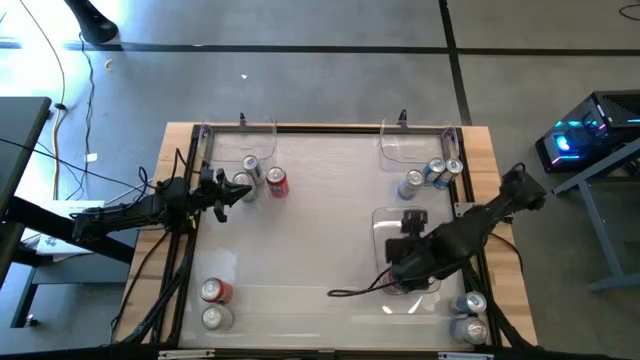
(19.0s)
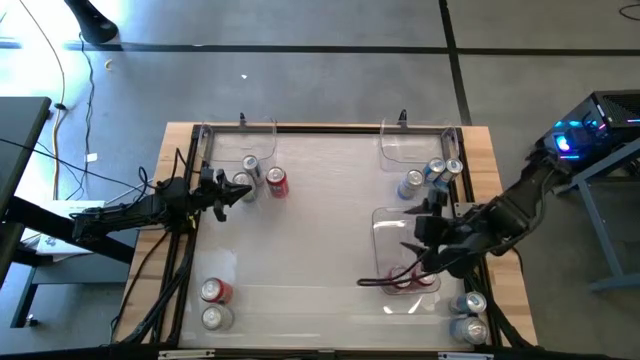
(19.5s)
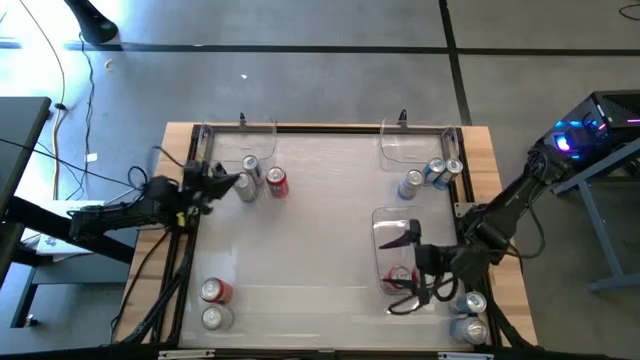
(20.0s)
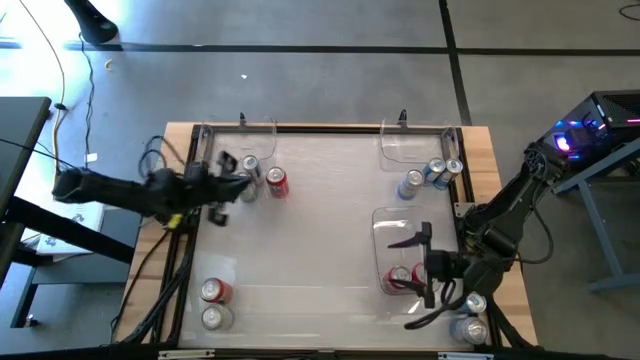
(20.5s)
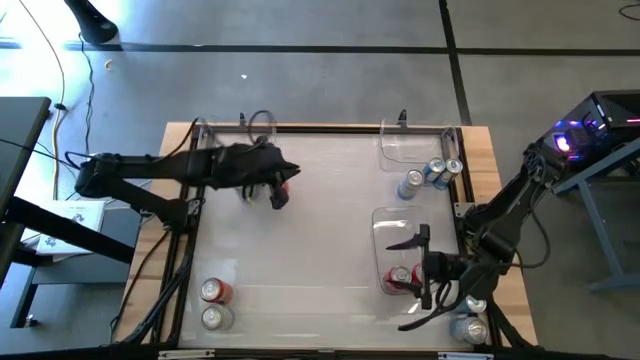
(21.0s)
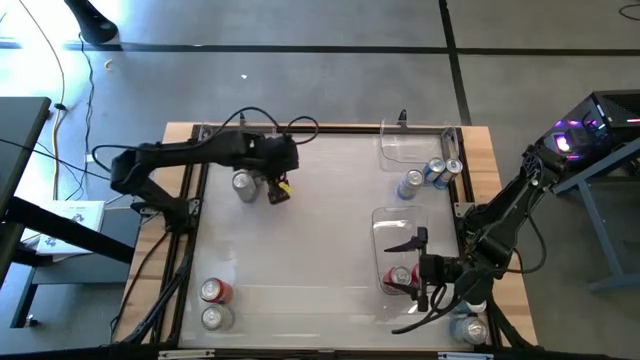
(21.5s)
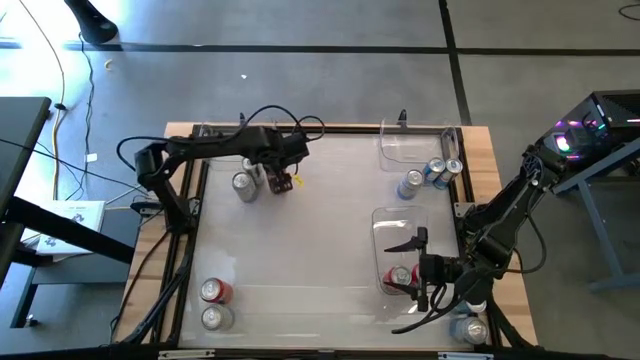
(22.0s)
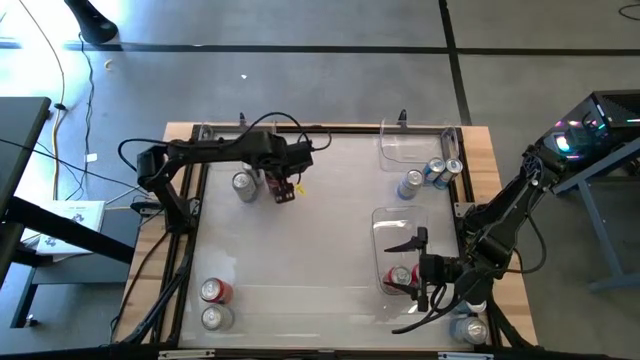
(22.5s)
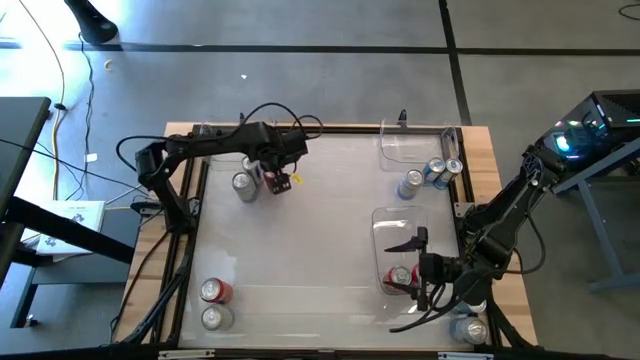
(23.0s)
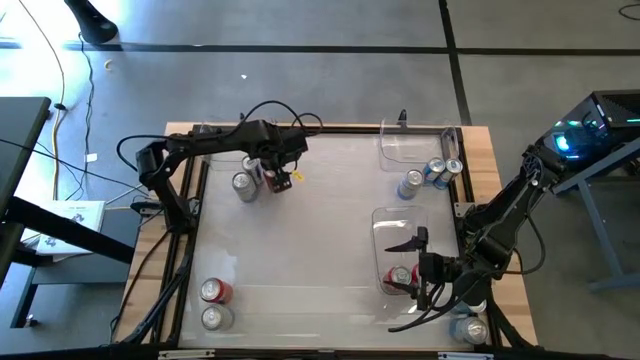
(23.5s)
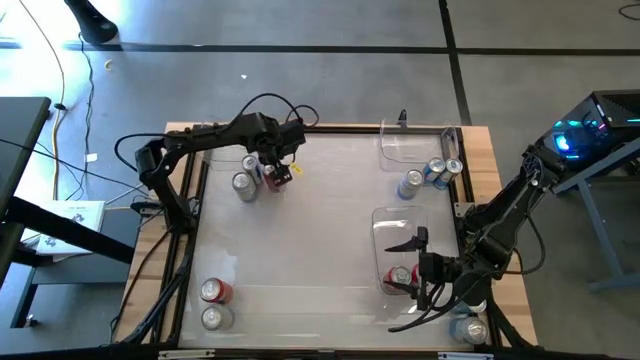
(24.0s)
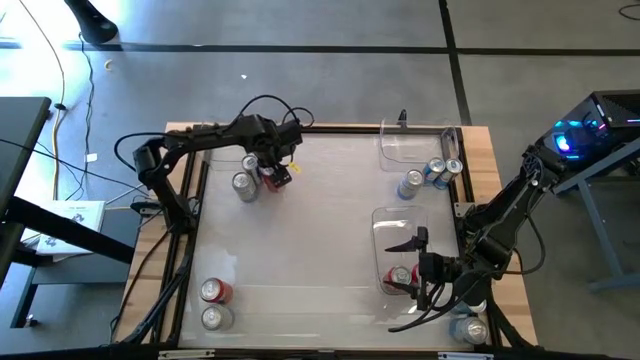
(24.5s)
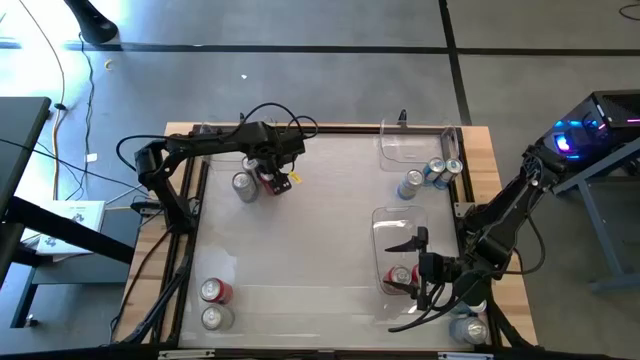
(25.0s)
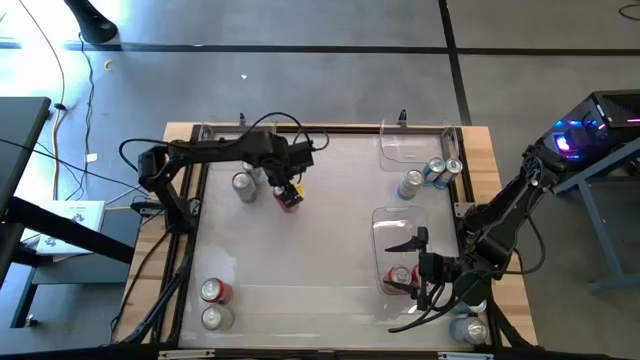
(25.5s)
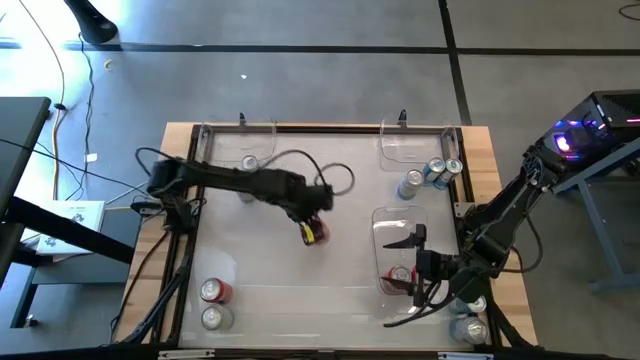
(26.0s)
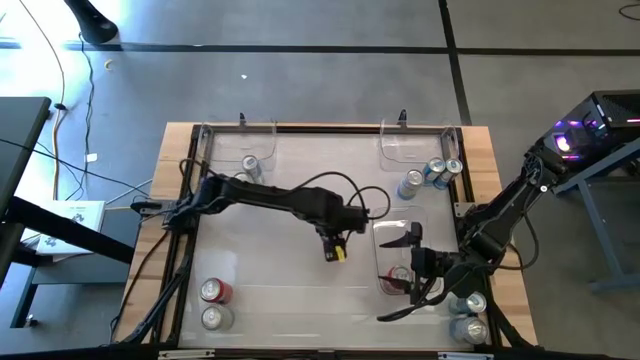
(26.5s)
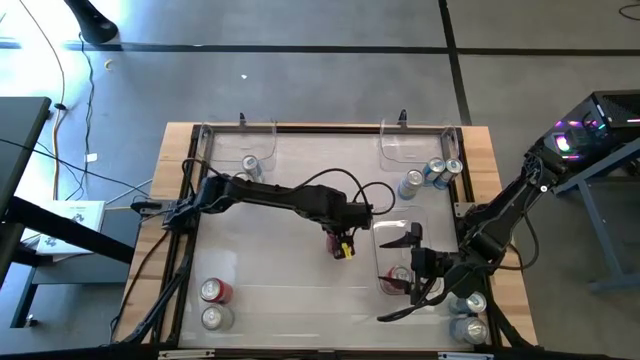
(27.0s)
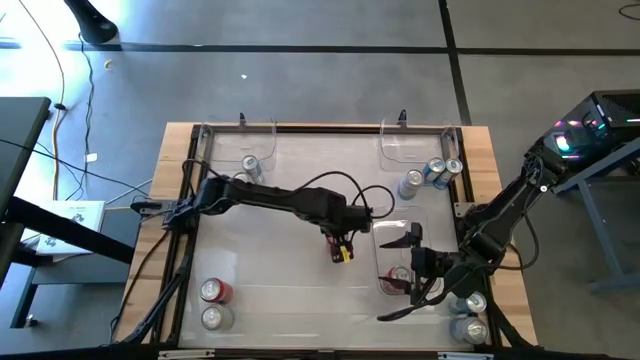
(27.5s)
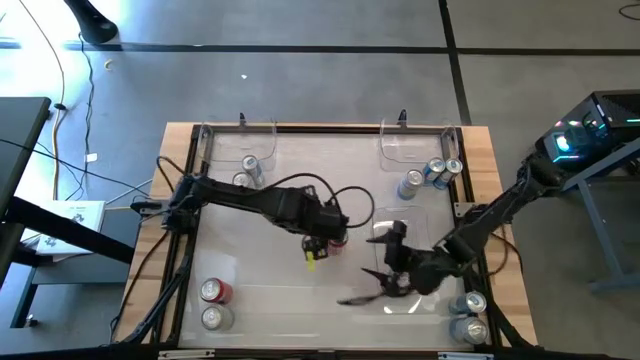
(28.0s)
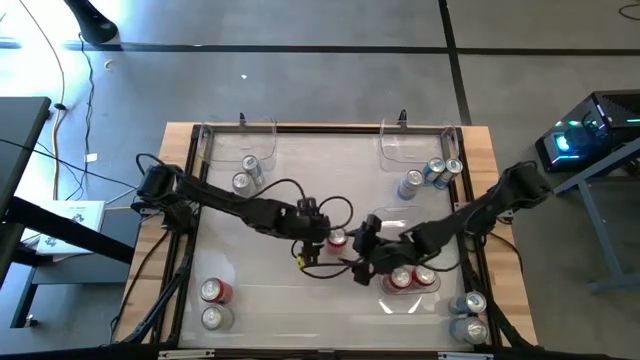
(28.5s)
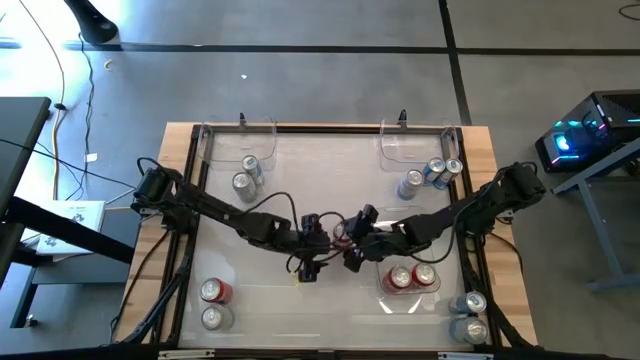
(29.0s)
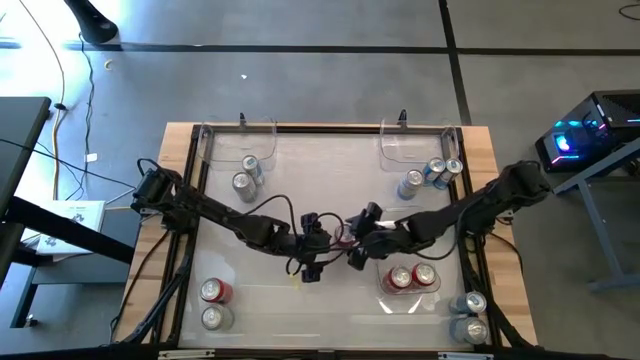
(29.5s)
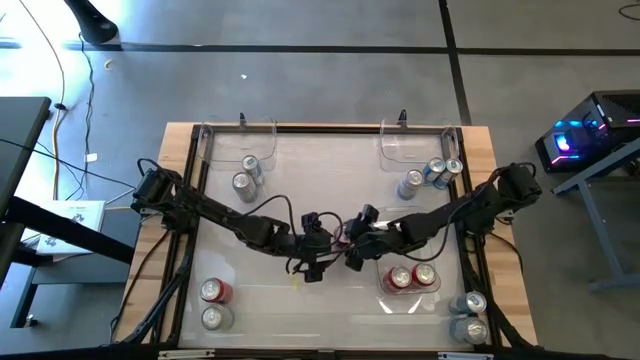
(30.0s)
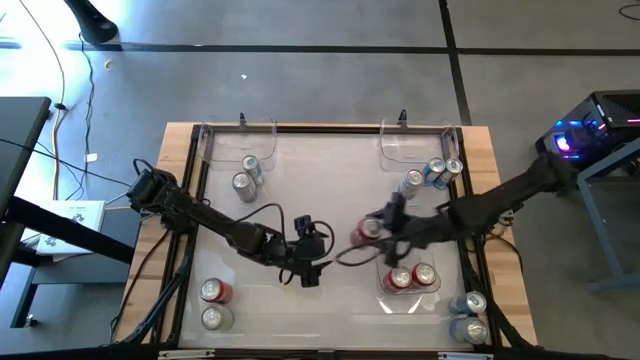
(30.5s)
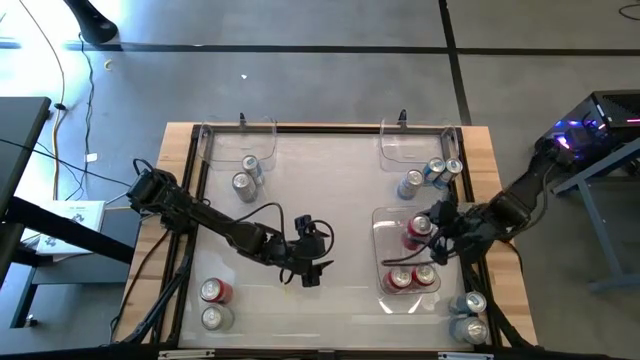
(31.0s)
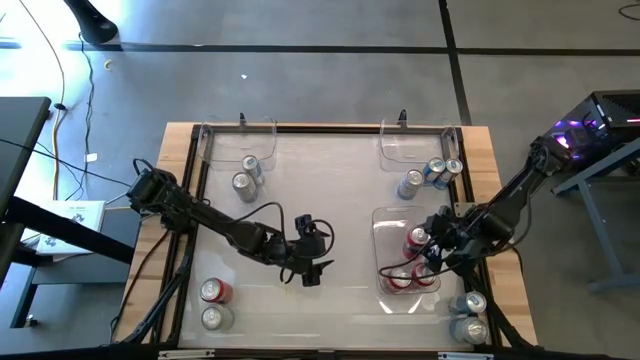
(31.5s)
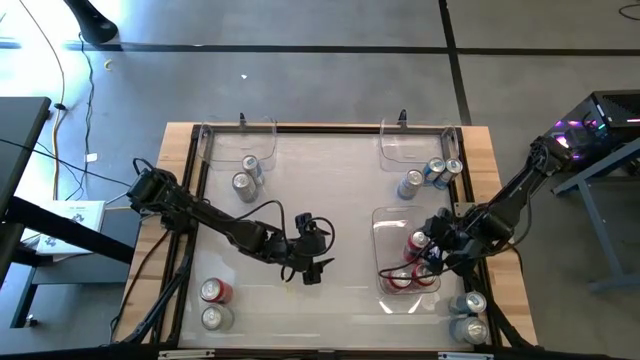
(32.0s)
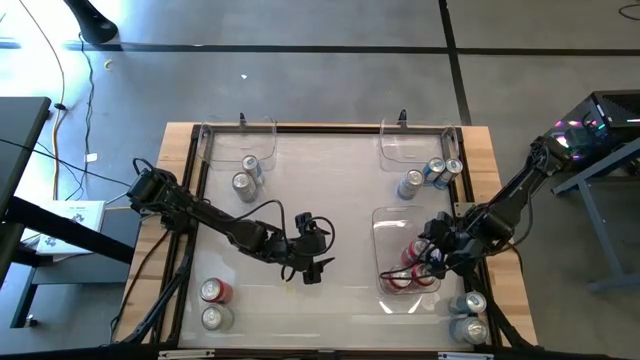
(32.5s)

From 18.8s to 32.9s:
Task: Sort soda cans
Put the top orange soda can into the bottom right transparent bin

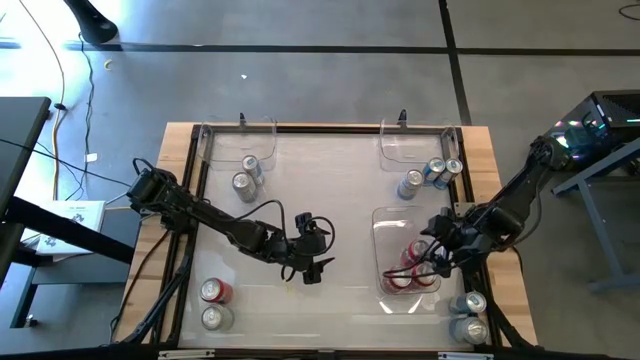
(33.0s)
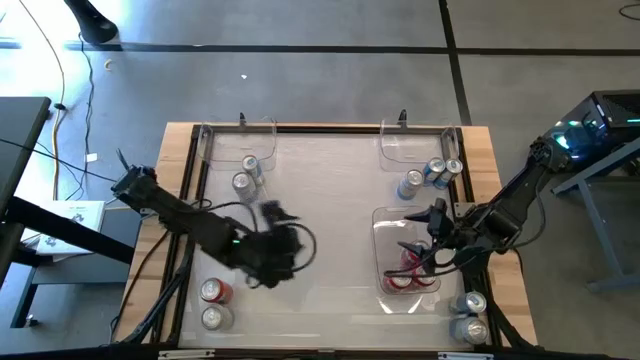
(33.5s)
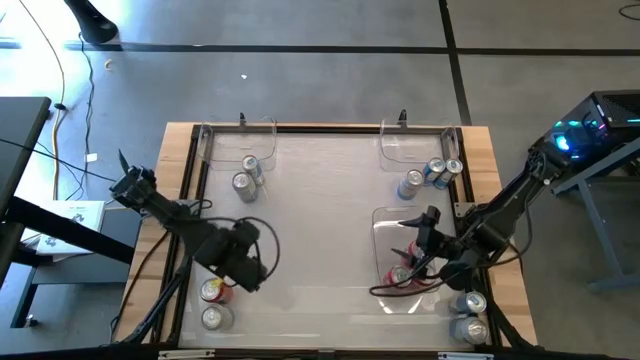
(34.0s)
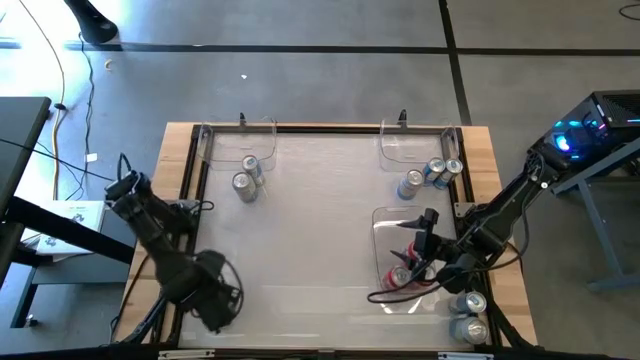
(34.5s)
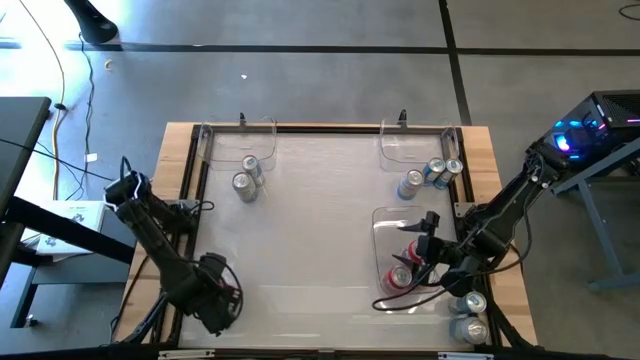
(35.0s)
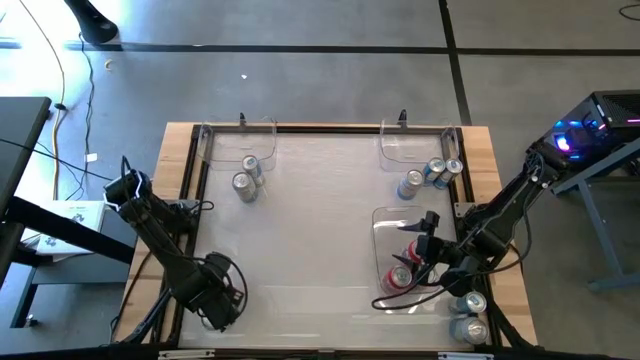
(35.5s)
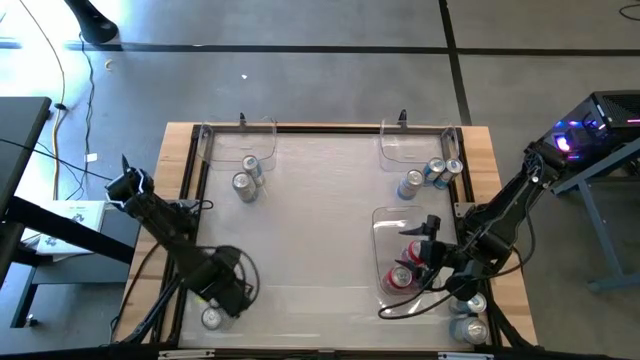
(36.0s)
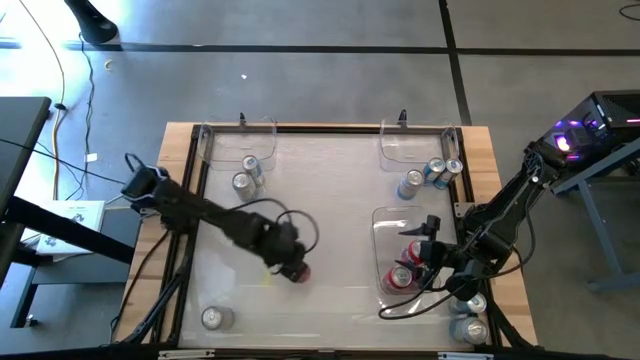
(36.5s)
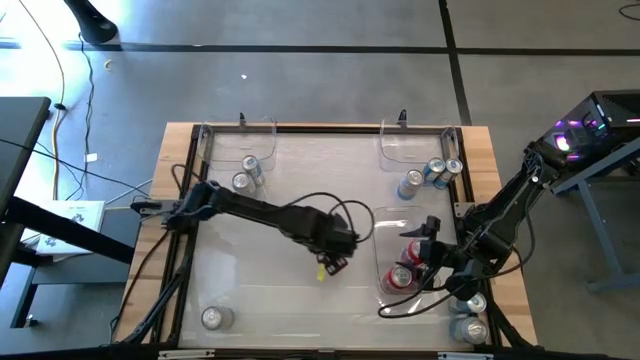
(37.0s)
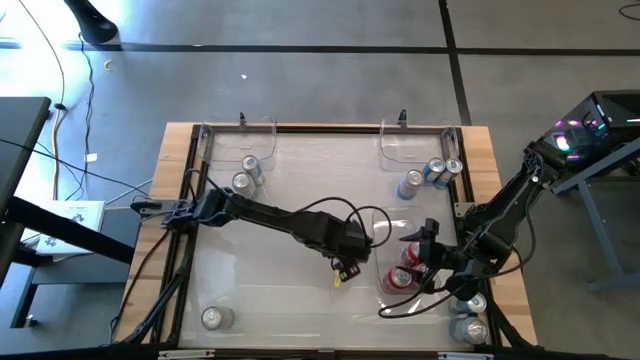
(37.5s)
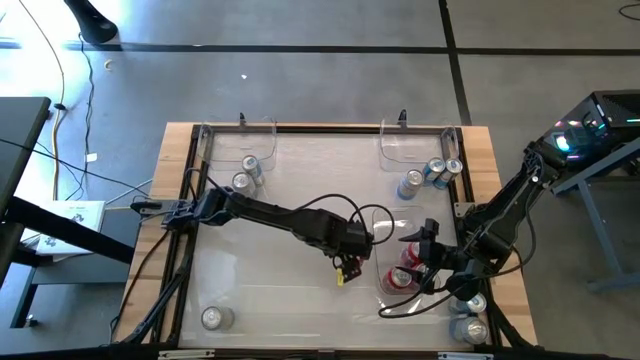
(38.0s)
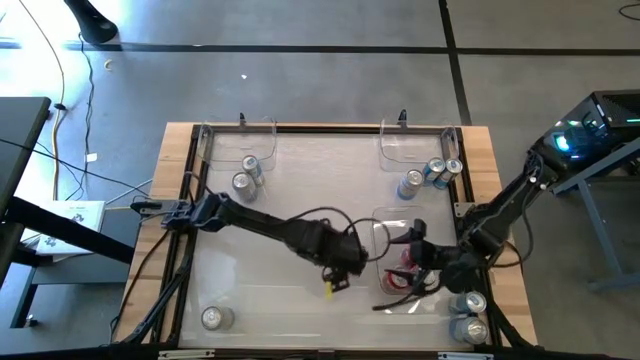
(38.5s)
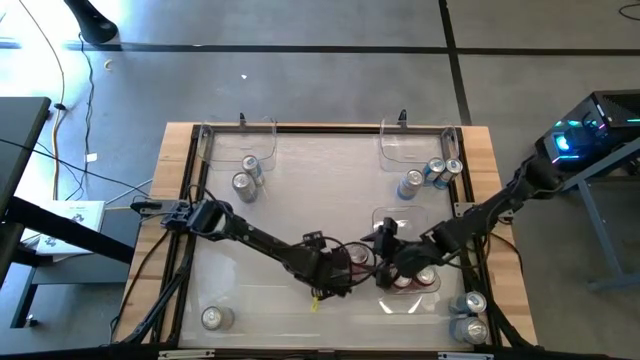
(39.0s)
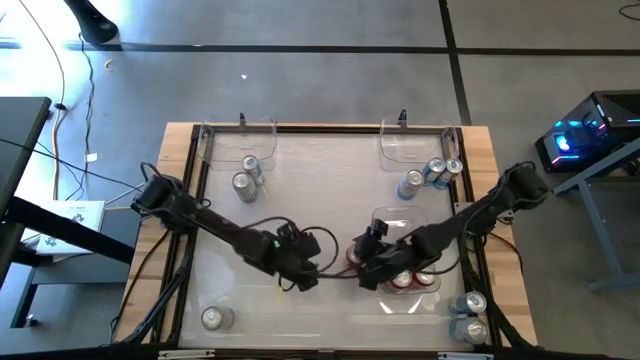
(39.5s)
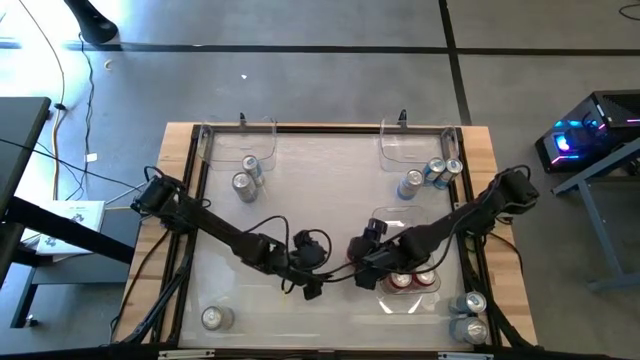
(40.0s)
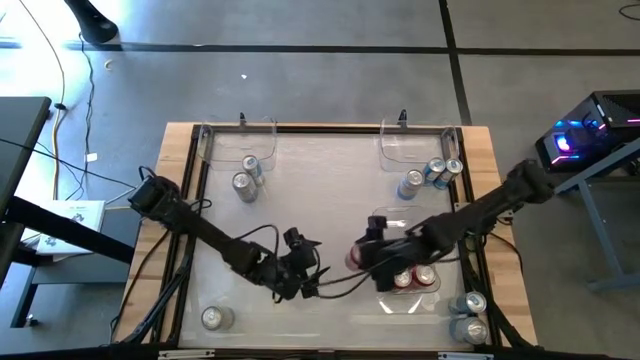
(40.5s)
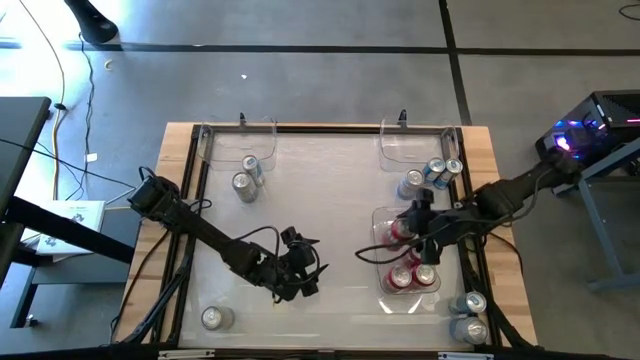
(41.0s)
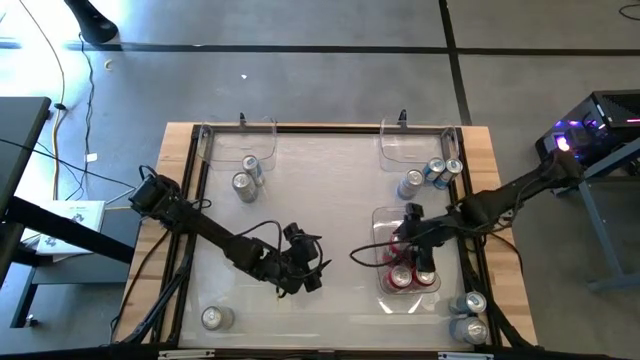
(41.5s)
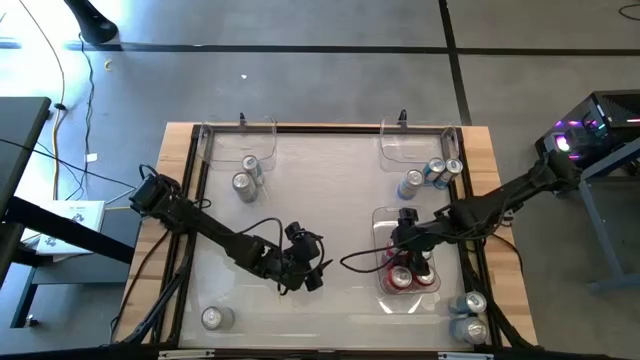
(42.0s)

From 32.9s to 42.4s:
Put the orange soda can into the bottom right transparent bin
